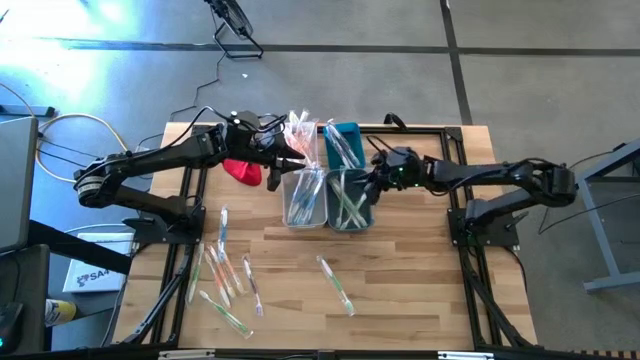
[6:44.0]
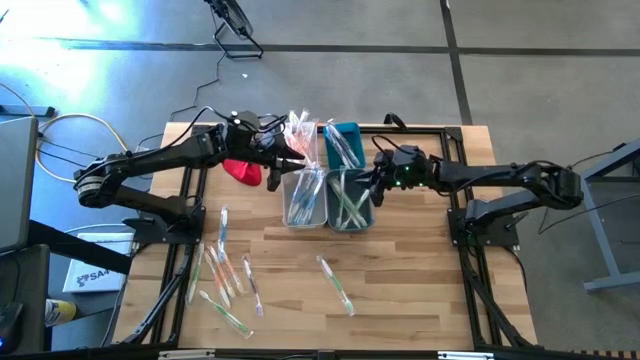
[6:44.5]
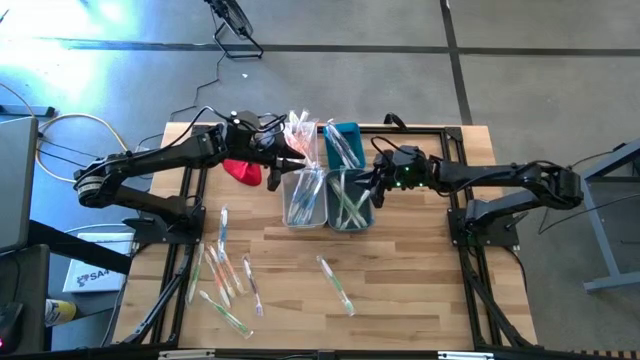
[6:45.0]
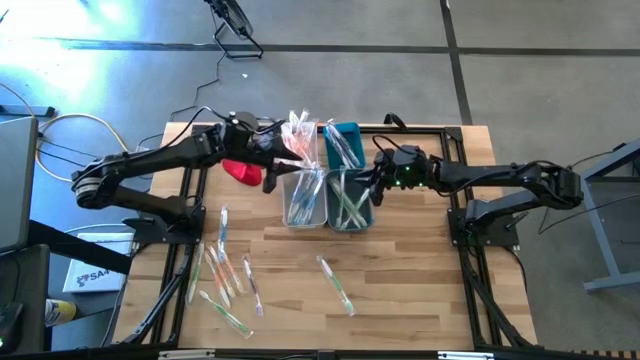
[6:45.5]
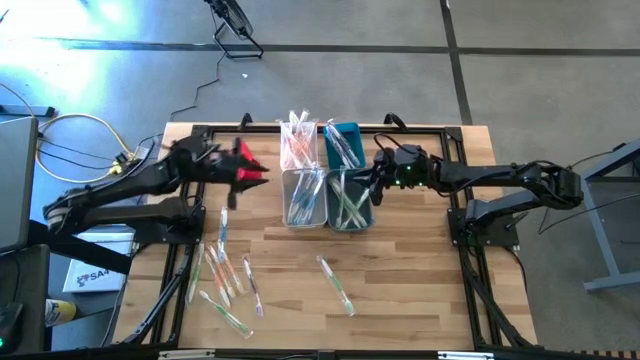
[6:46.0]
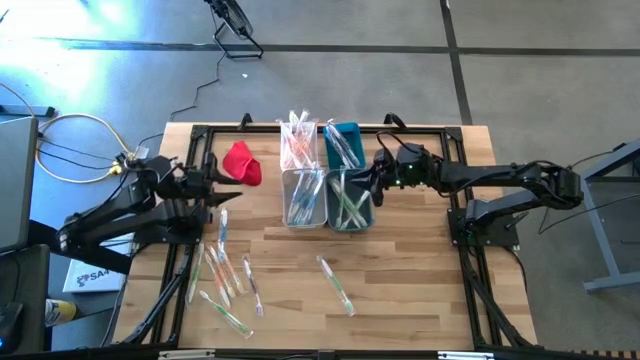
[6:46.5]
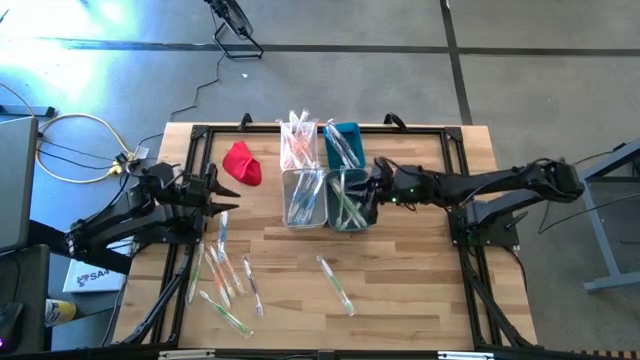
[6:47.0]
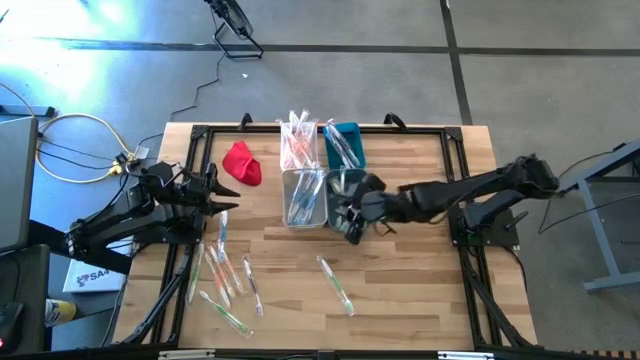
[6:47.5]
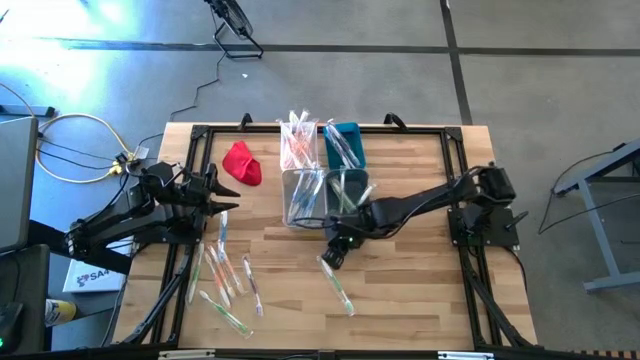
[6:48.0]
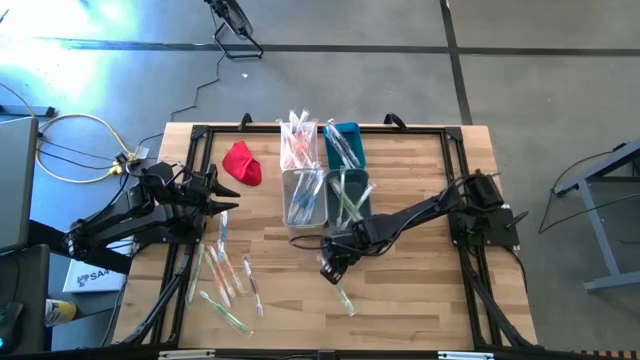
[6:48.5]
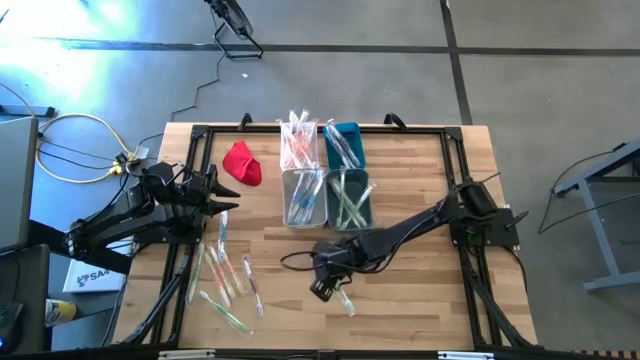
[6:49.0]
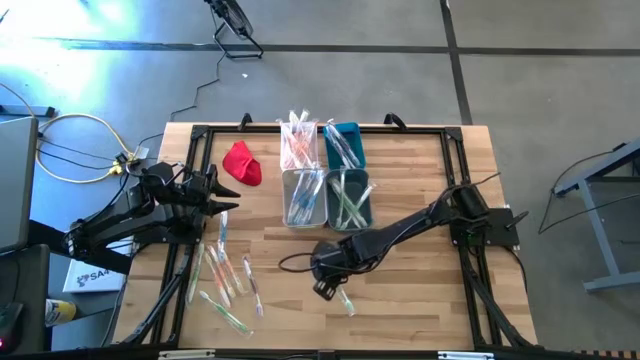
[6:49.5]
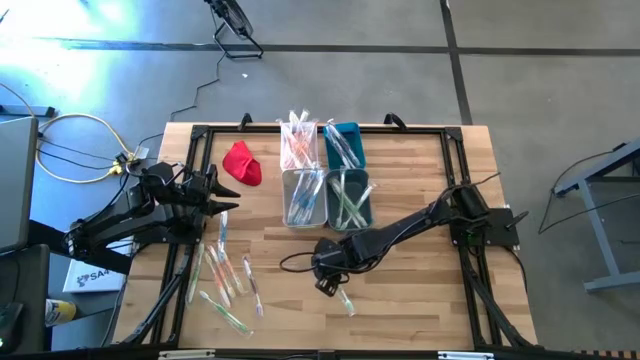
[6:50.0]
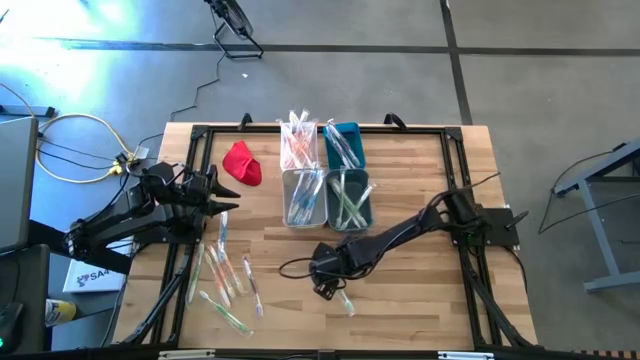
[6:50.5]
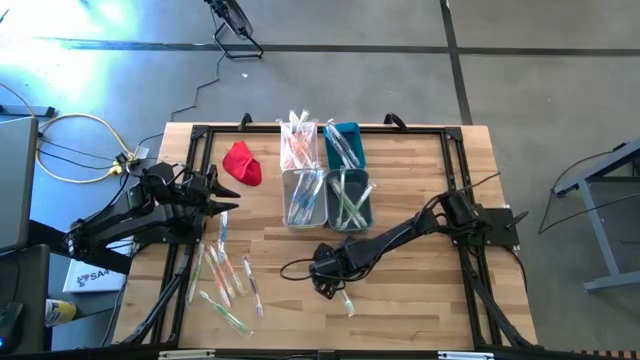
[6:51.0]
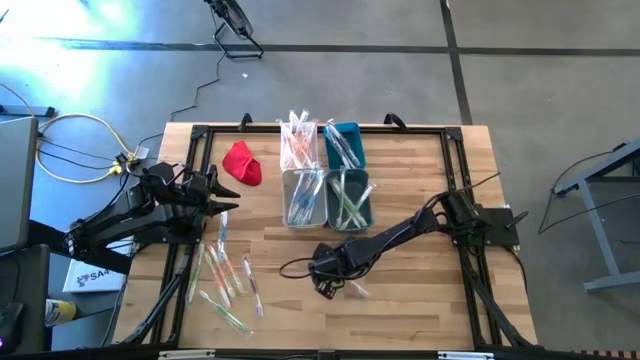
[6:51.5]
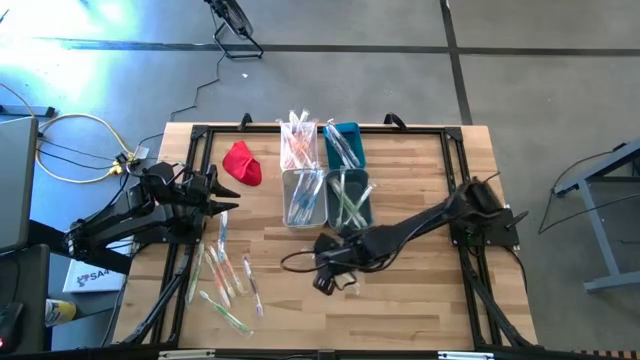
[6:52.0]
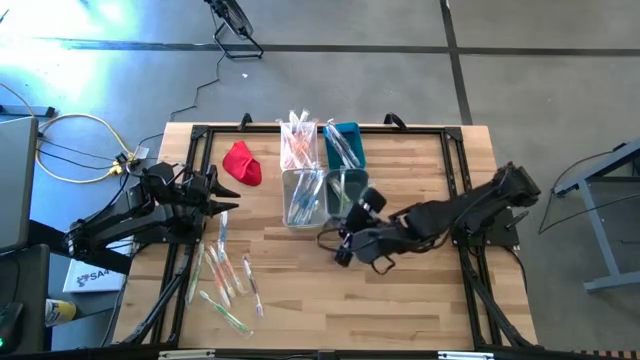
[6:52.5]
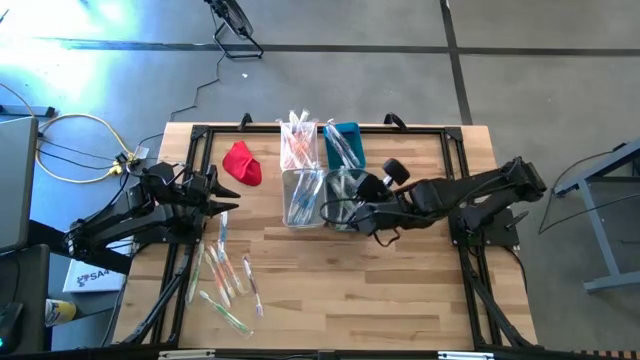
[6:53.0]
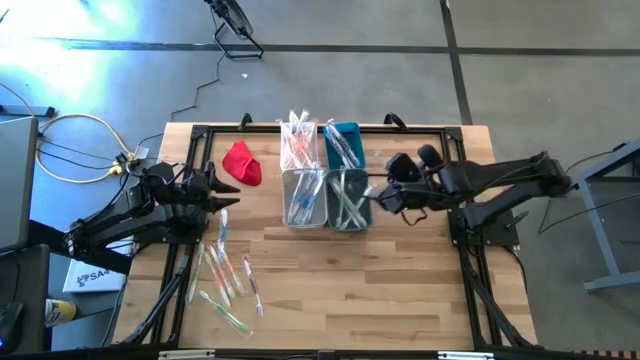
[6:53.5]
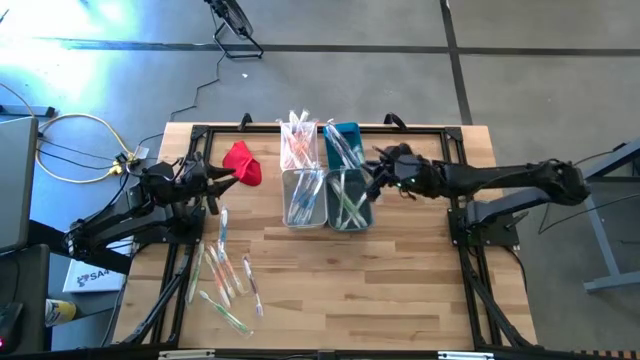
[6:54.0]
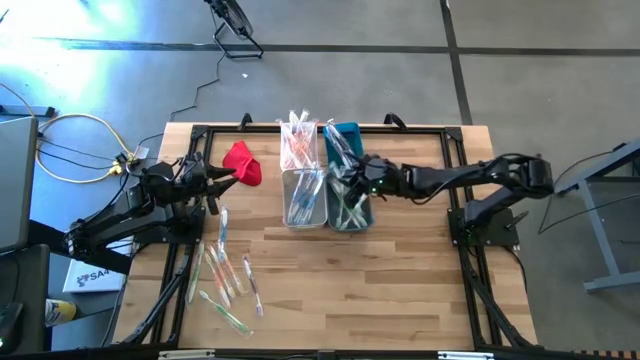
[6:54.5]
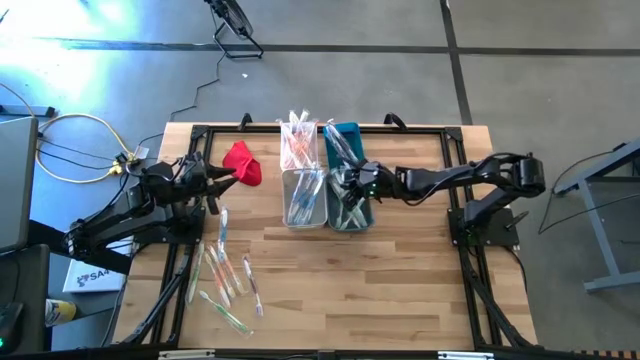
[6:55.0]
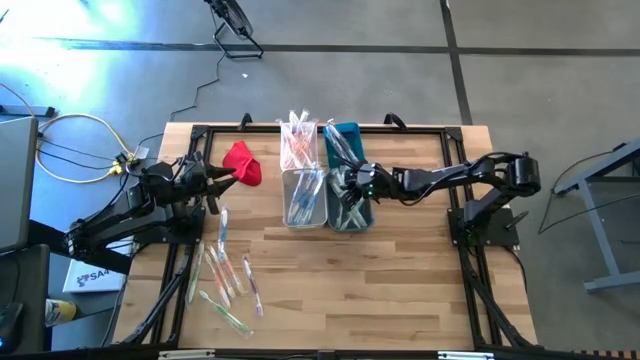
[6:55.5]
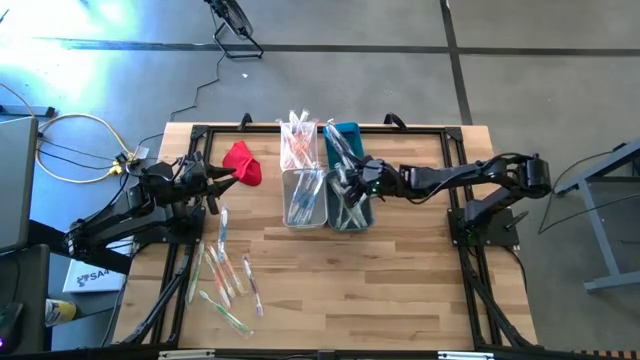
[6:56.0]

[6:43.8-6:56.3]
Task: Pick & Place Toothbrushes
Put the green toothbrush into the blue bin

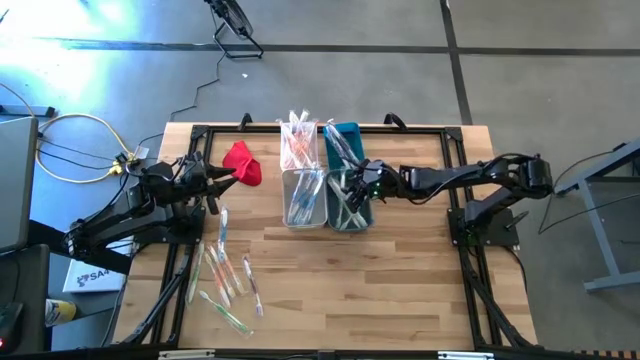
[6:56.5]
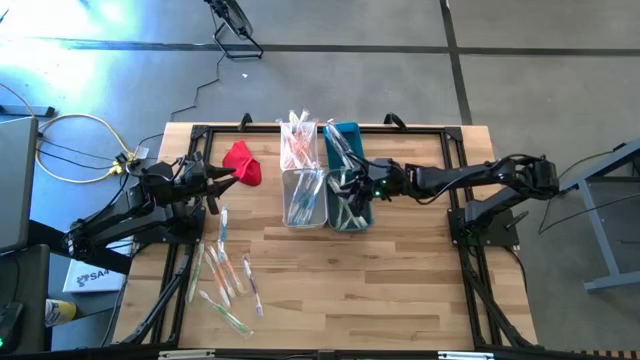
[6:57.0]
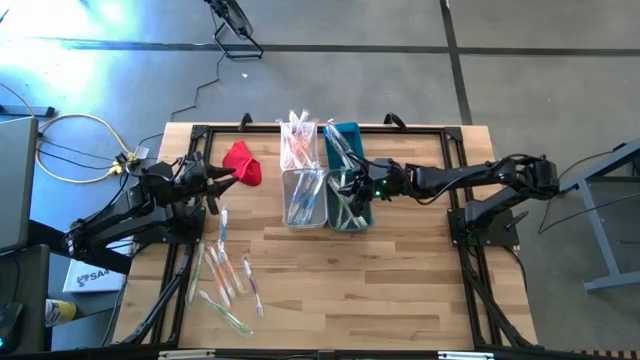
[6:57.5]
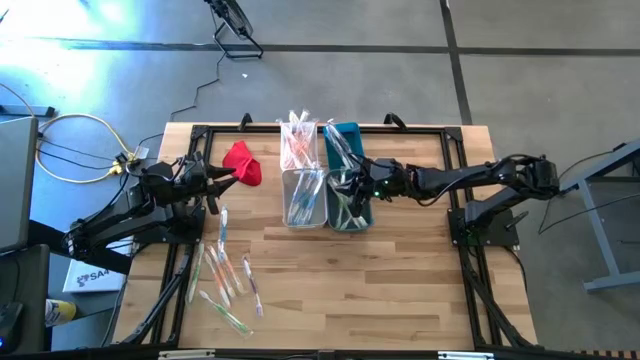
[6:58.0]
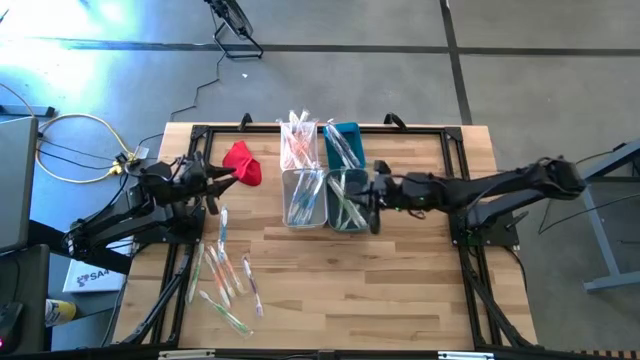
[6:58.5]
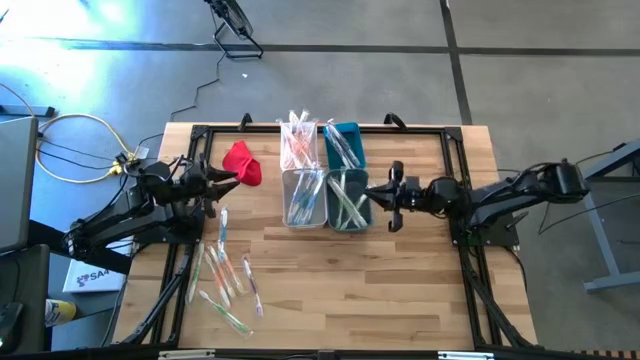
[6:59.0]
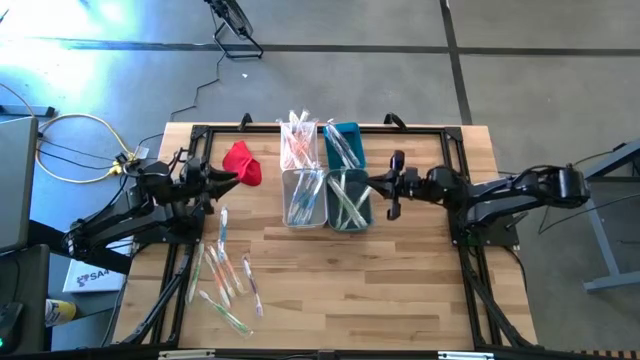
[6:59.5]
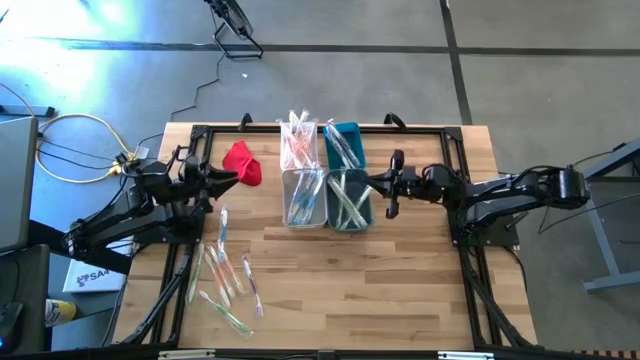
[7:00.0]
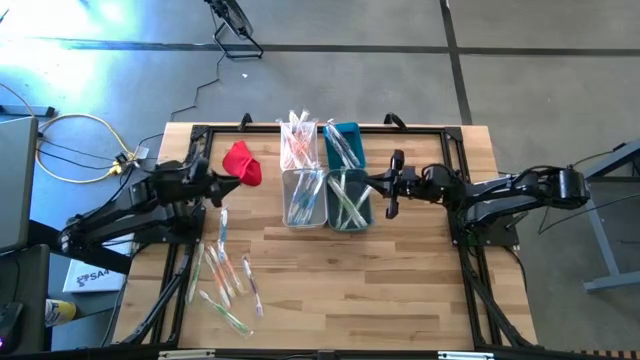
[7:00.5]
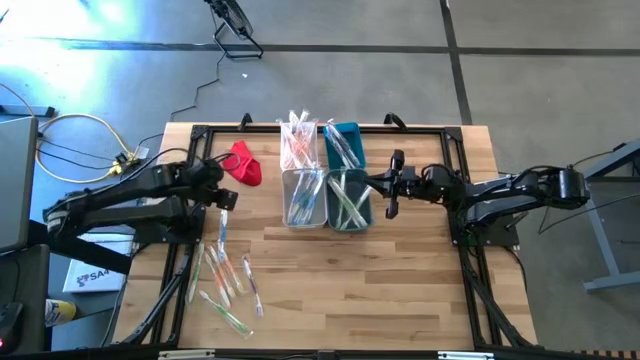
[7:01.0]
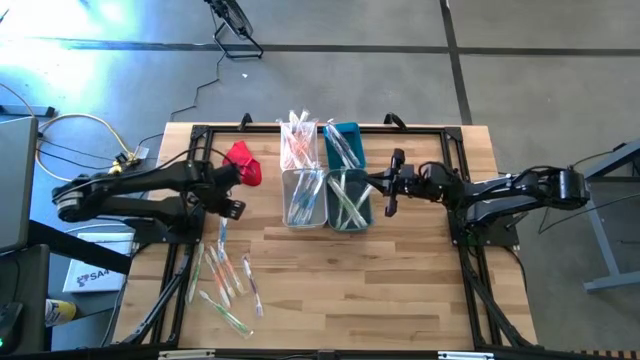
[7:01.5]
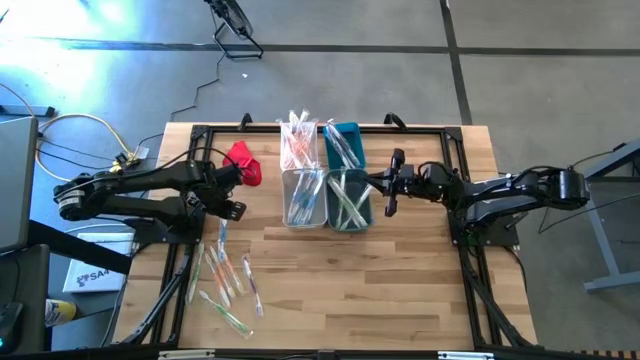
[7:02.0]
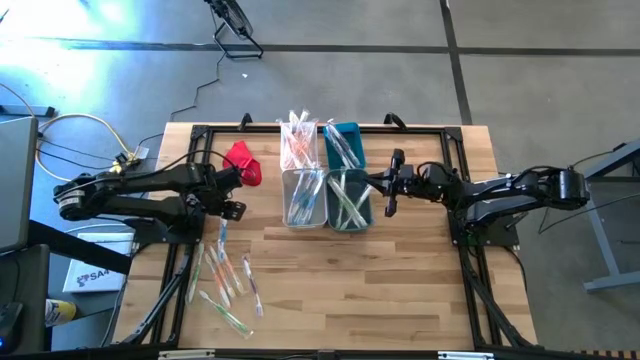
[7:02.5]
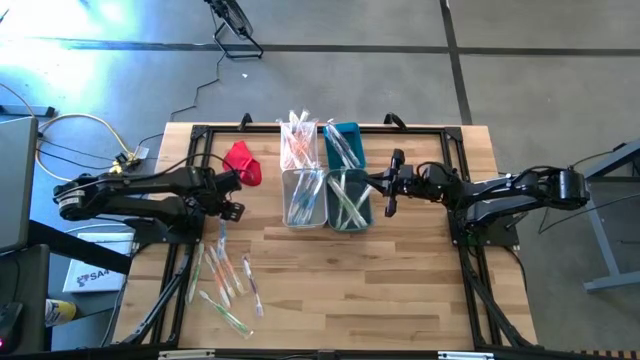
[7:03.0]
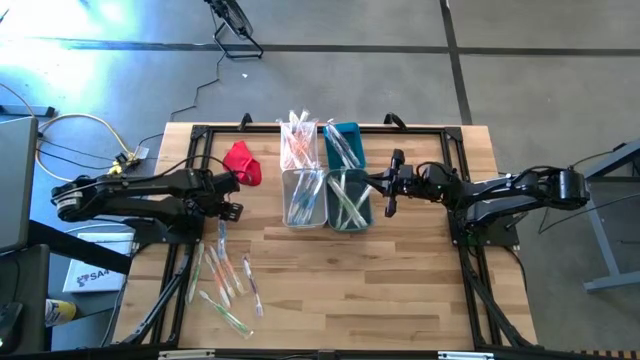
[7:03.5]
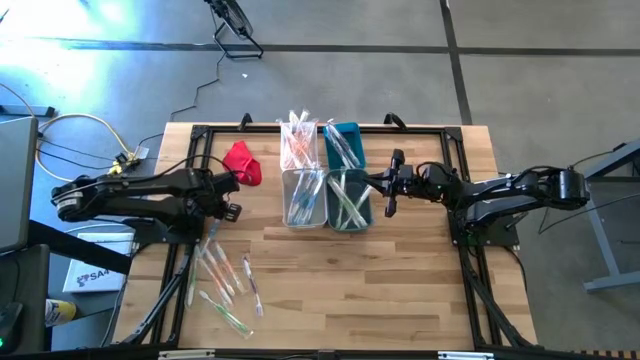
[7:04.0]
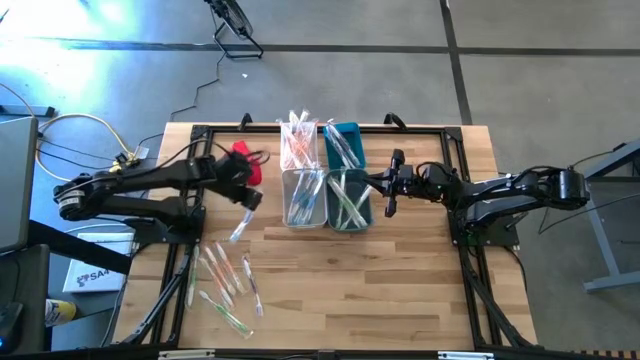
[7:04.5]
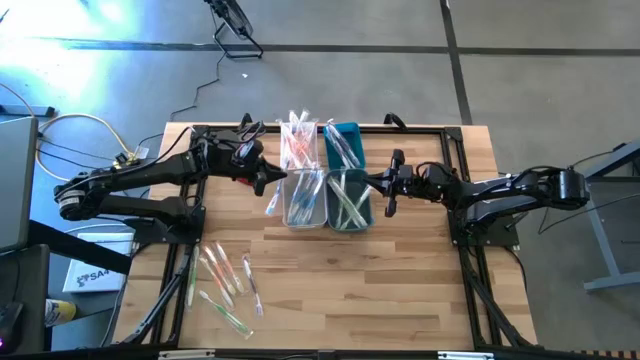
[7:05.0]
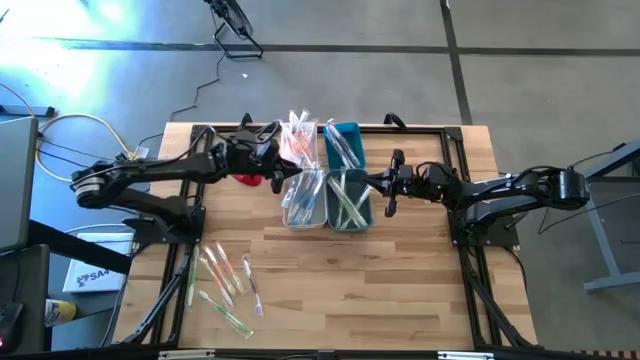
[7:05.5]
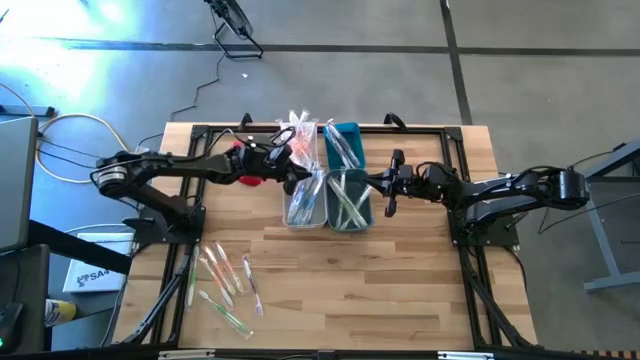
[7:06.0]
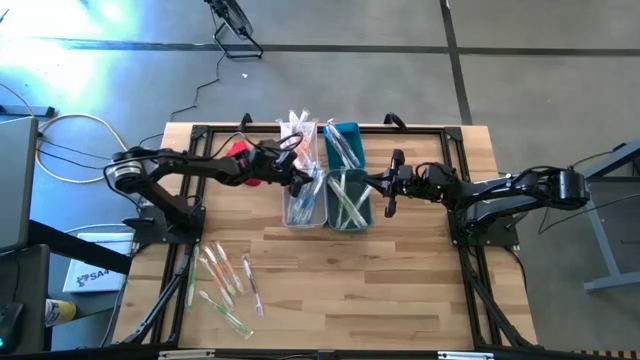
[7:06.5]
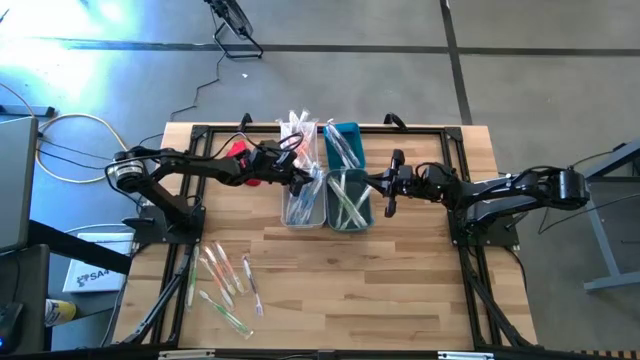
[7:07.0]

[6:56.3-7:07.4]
Put the blue toothbrush into the gray bin
